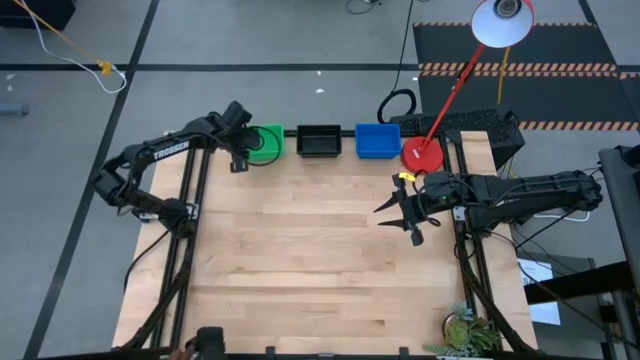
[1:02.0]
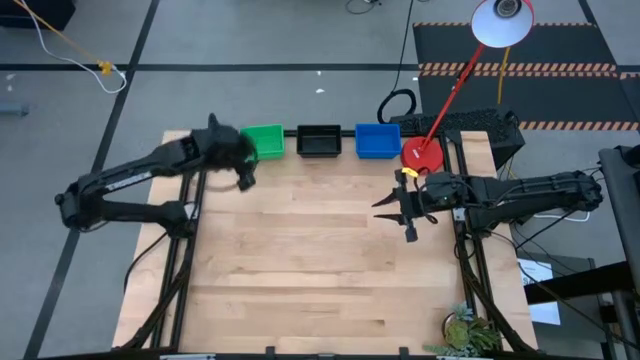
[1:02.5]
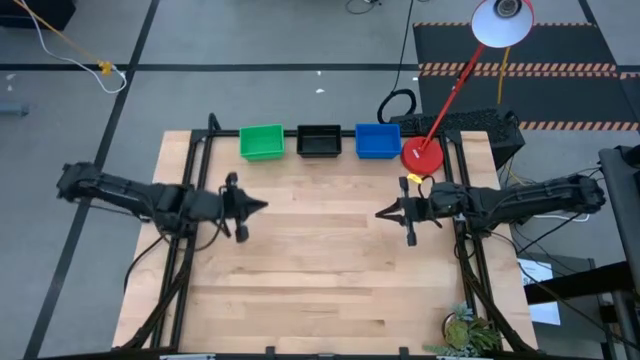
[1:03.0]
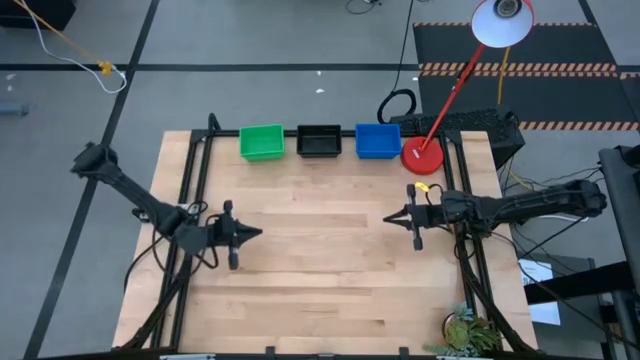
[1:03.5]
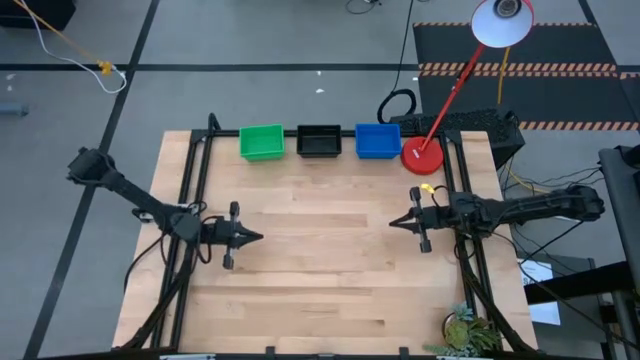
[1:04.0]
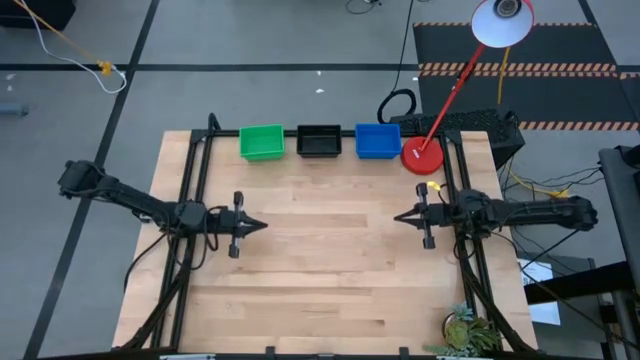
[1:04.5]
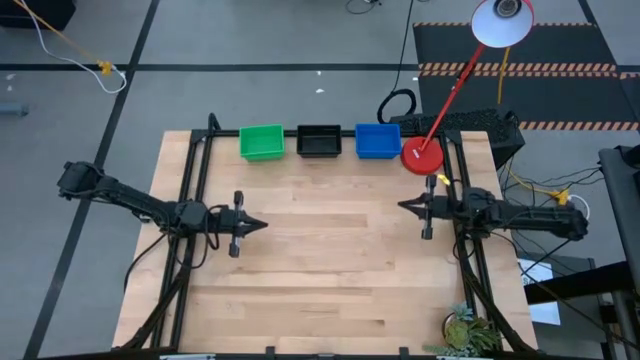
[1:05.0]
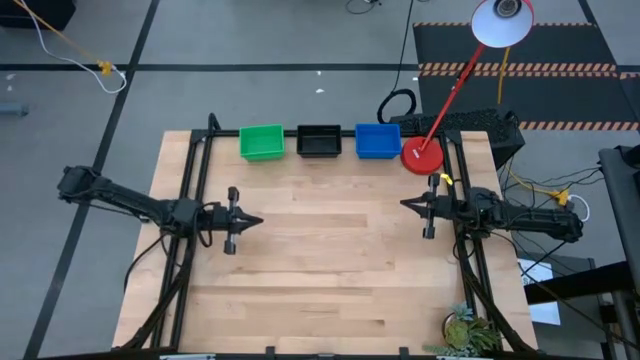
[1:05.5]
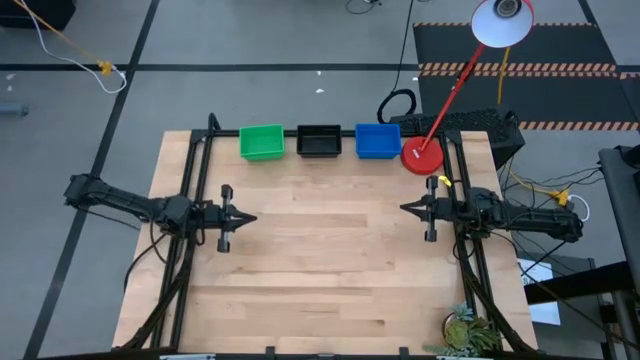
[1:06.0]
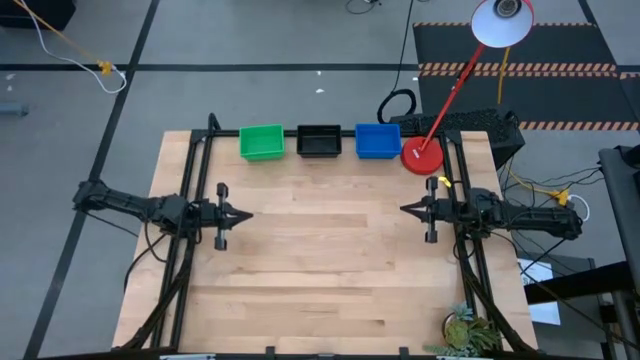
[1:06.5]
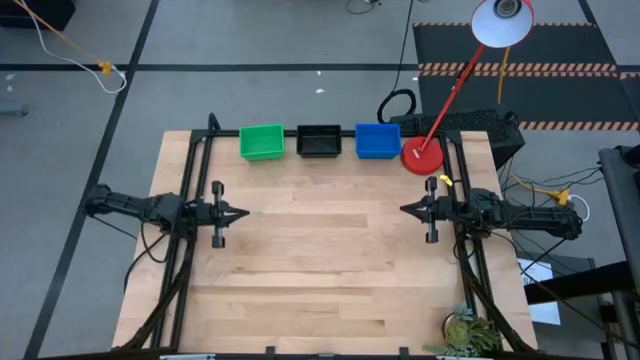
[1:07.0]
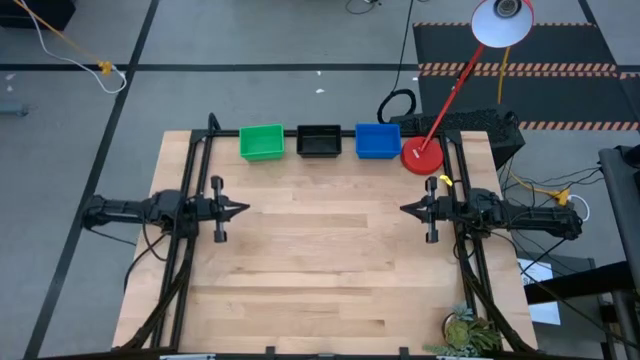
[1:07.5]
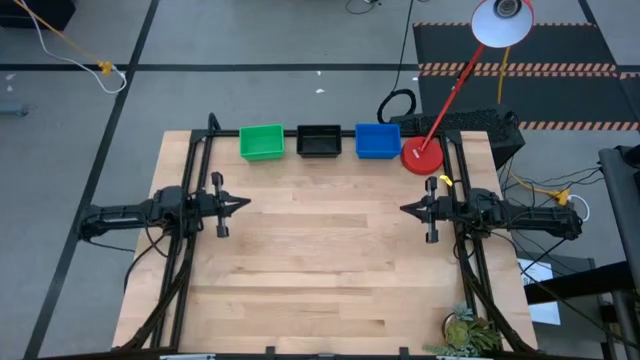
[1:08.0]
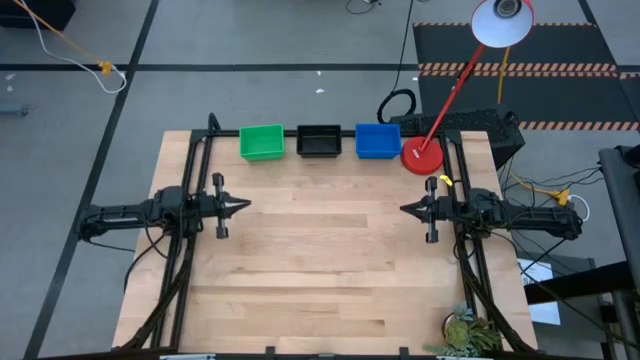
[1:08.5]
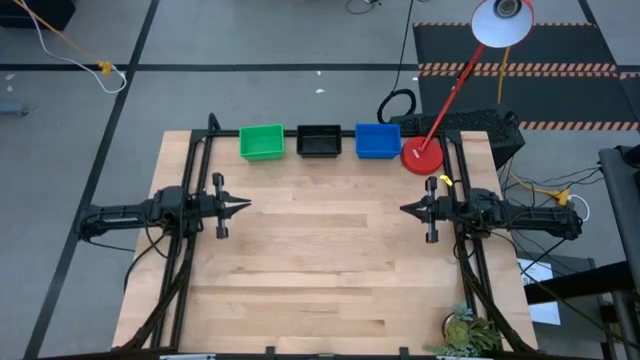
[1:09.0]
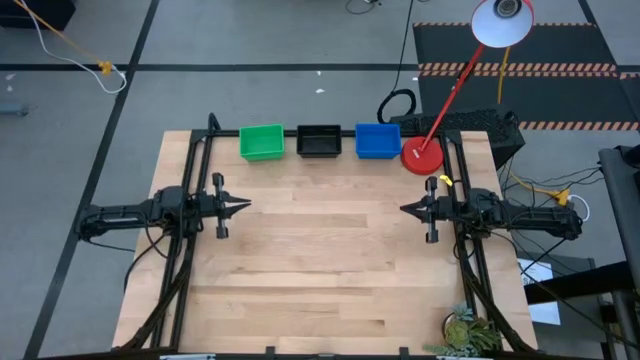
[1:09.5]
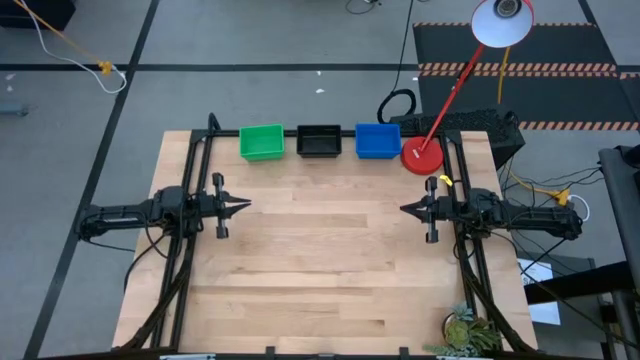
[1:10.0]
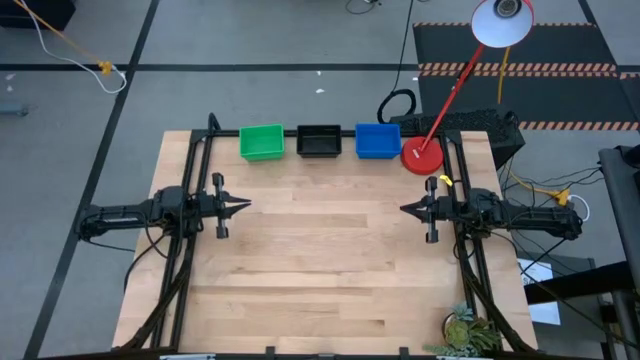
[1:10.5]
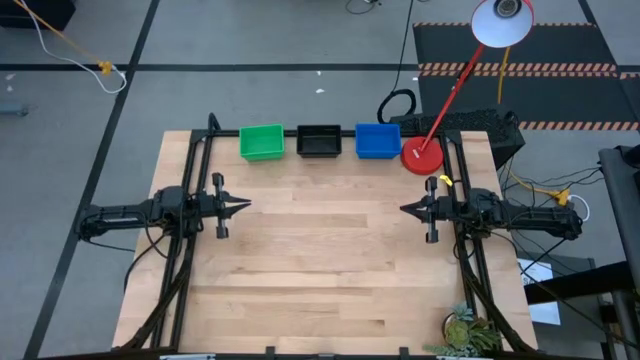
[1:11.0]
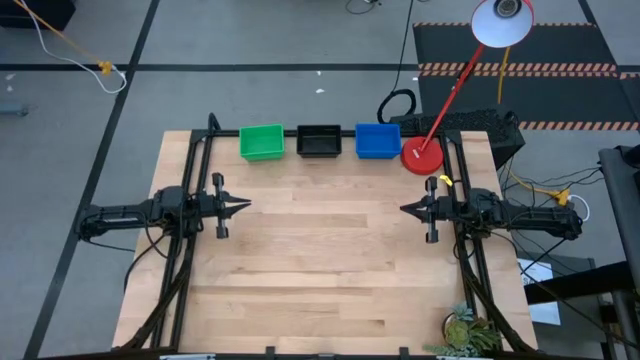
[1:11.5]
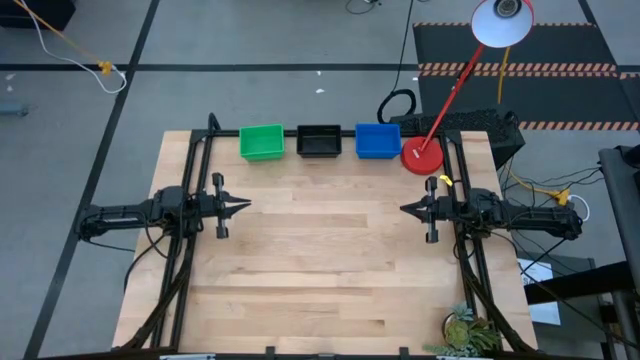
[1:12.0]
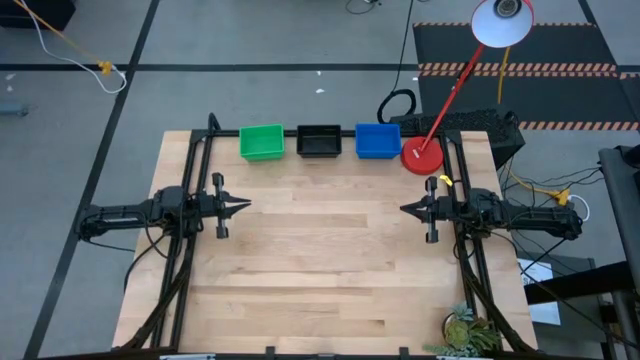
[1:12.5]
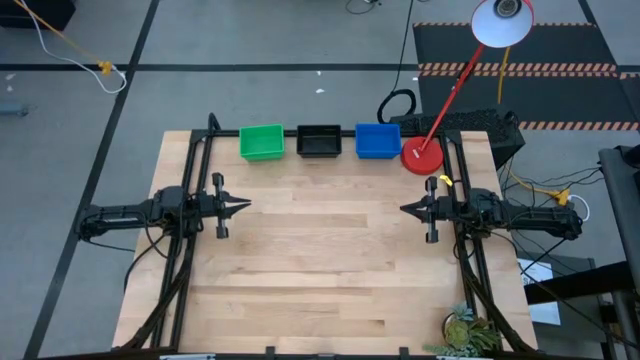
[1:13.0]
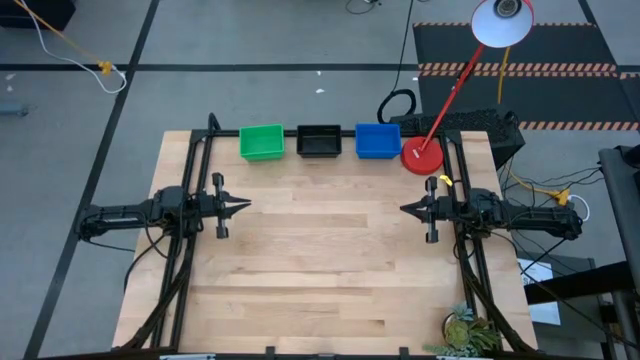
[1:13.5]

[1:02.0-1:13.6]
Return to Home Position

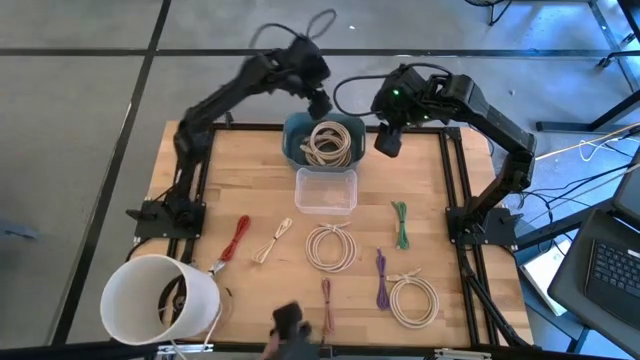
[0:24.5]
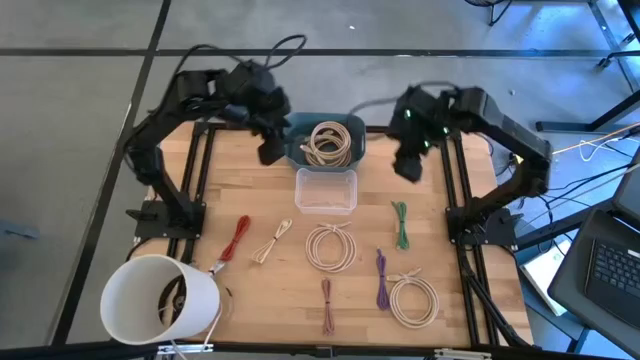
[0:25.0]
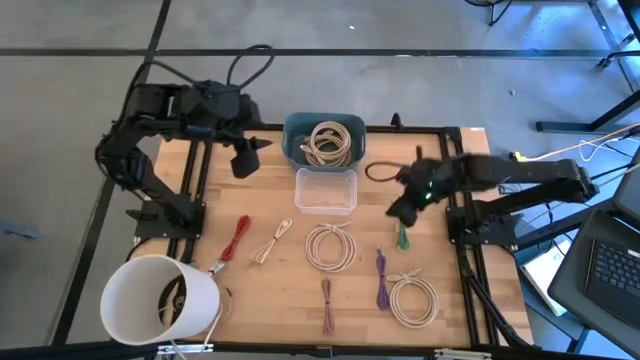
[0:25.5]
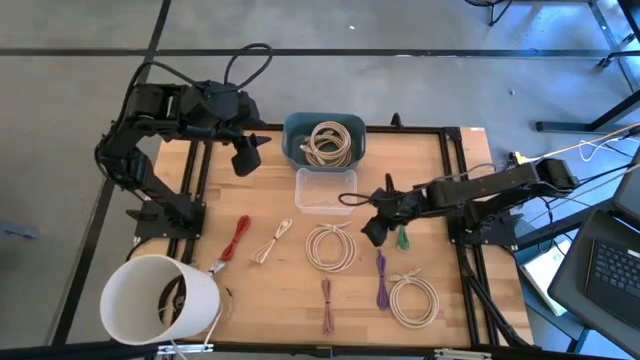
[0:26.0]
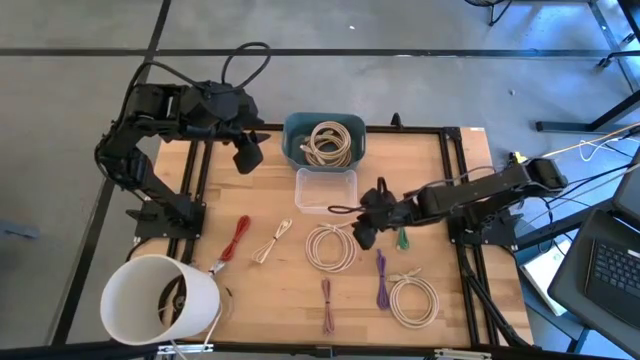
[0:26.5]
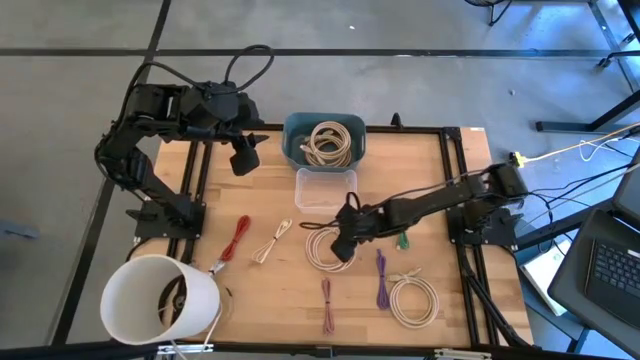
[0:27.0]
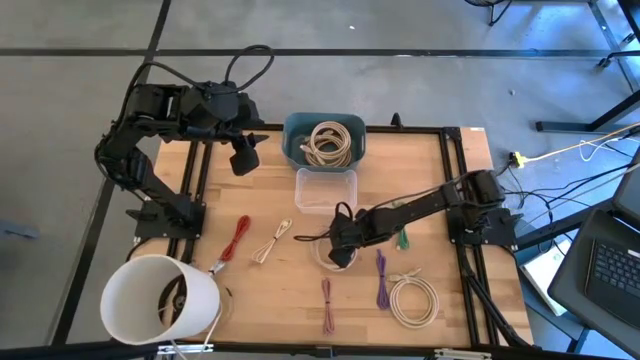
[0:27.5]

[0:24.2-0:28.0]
Put the brown HDMI cable into the blue bin

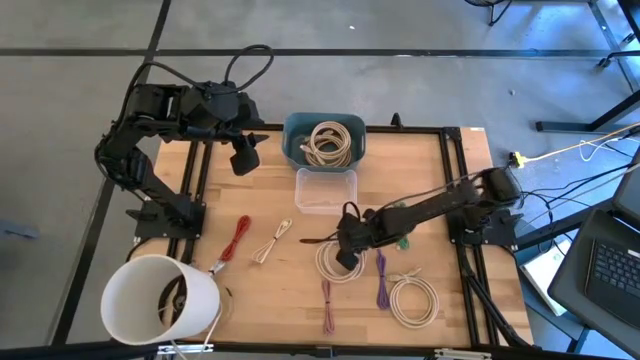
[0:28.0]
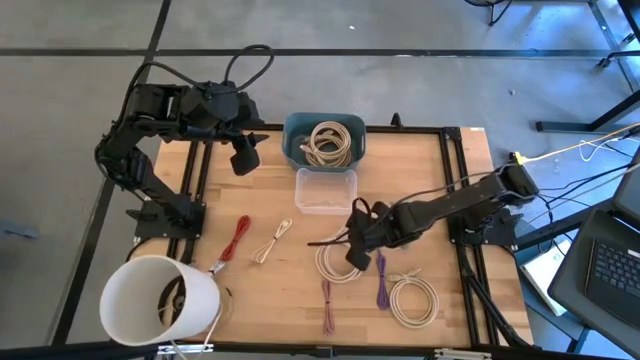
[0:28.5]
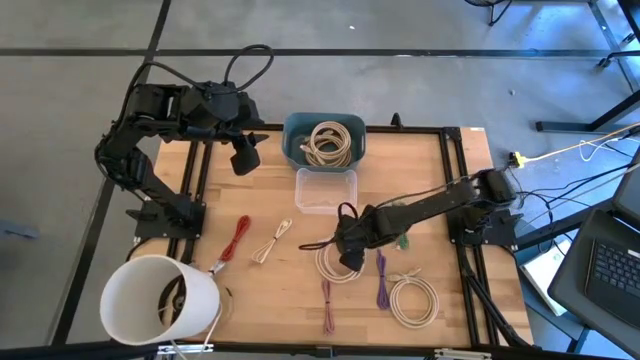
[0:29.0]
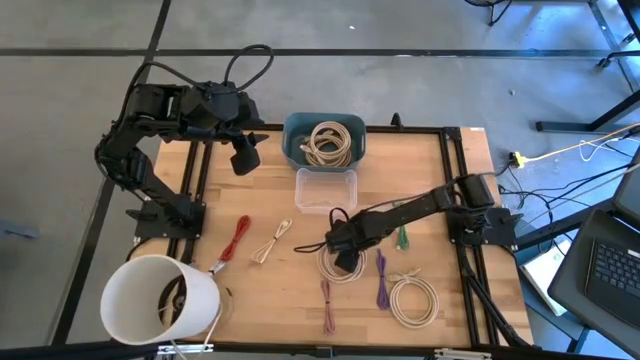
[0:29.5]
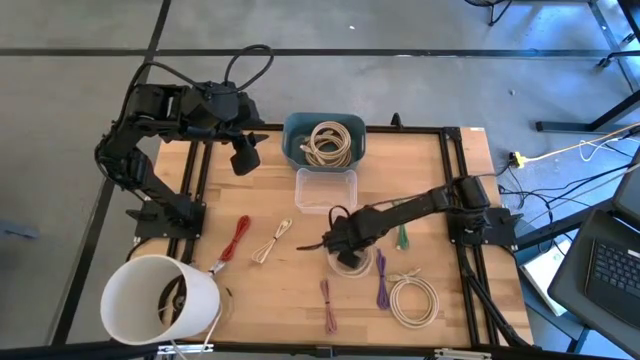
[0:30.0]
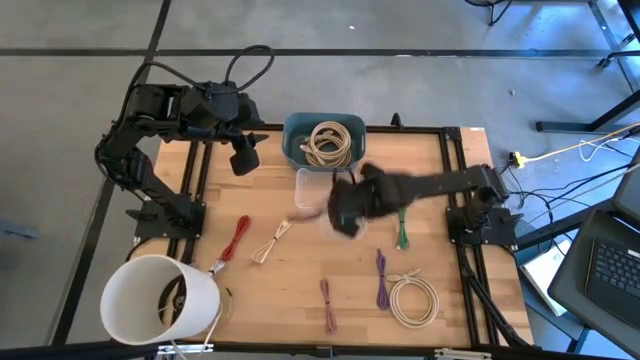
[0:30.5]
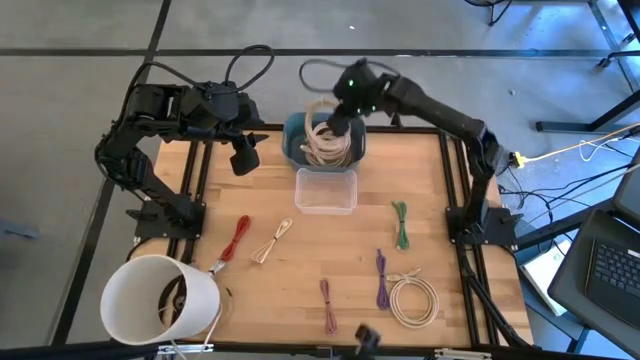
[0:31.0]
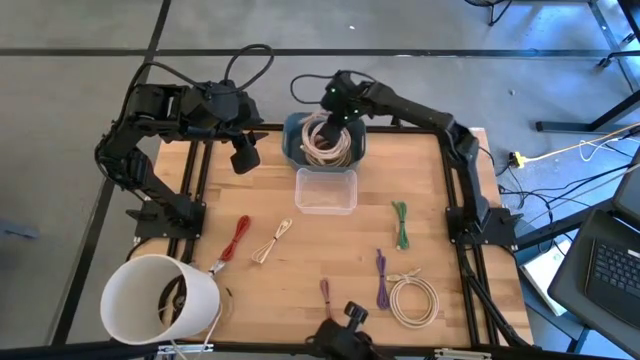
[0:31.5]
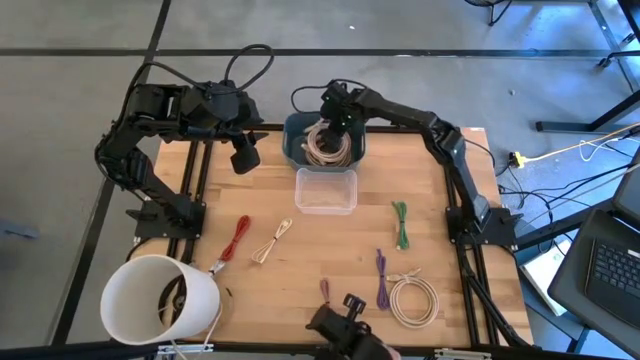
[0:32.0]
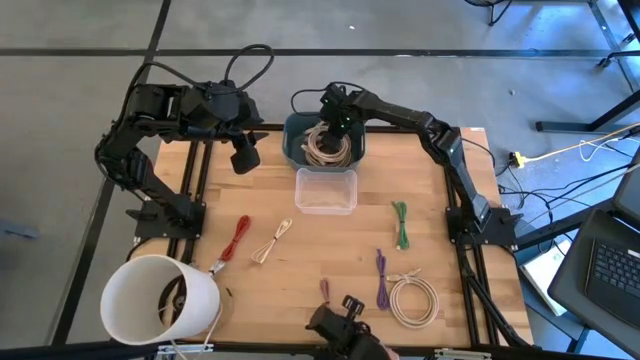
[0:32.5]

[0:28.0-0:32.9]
Put the brown HDMI cable into the blue bin
